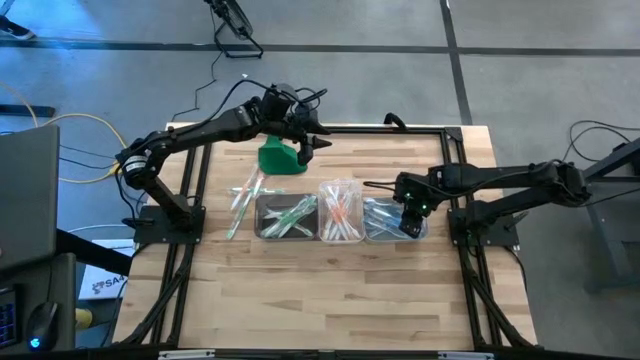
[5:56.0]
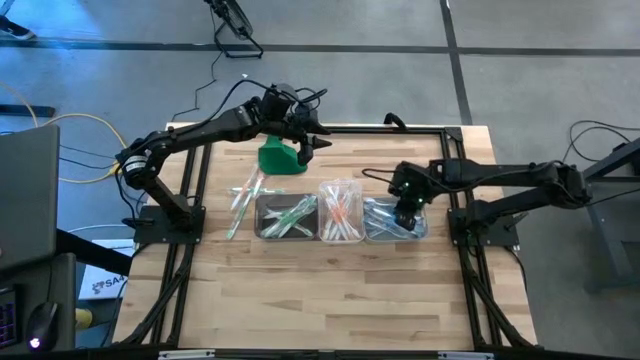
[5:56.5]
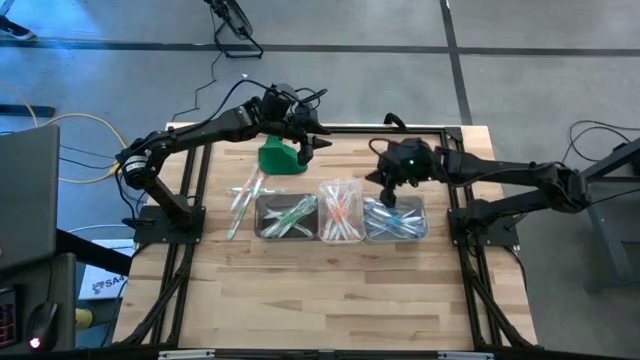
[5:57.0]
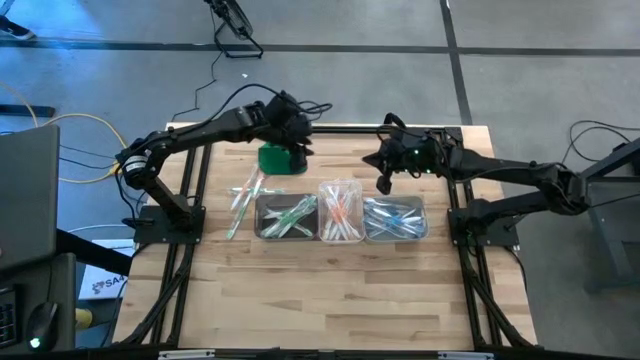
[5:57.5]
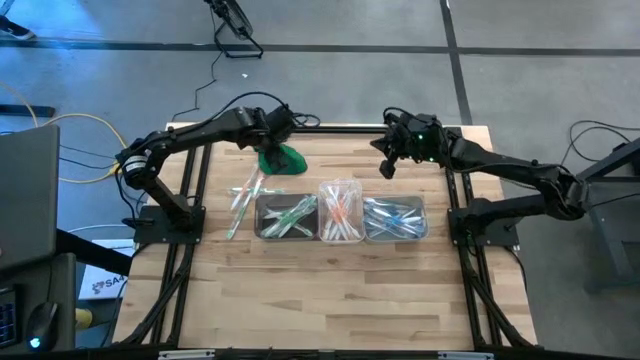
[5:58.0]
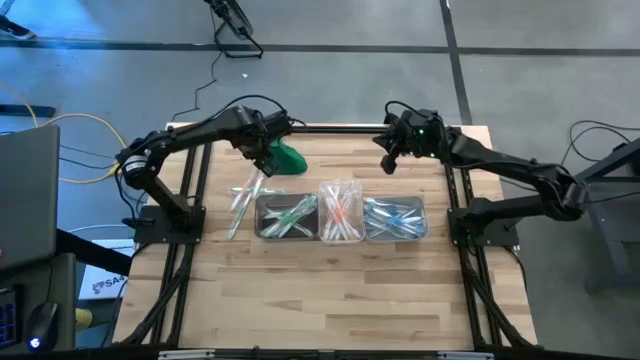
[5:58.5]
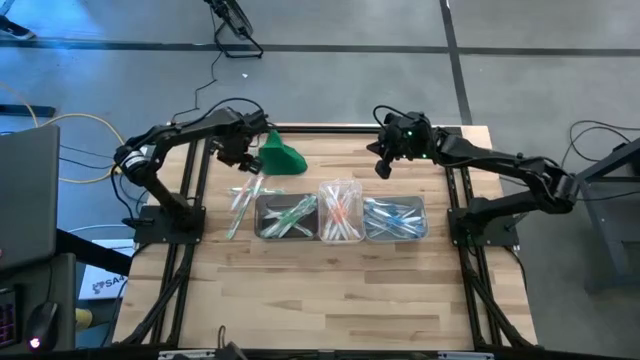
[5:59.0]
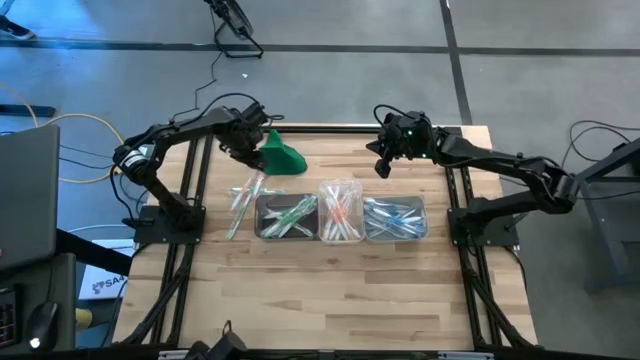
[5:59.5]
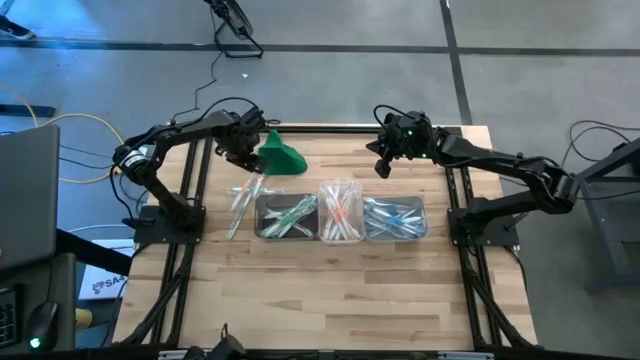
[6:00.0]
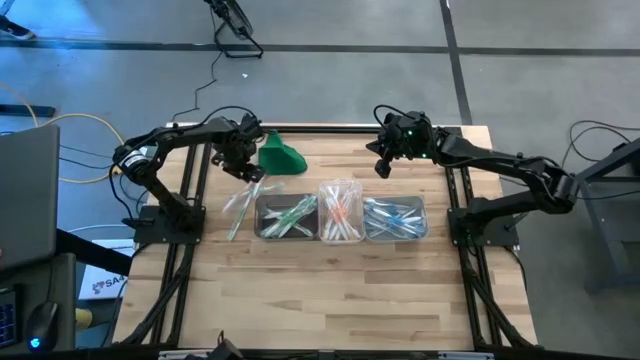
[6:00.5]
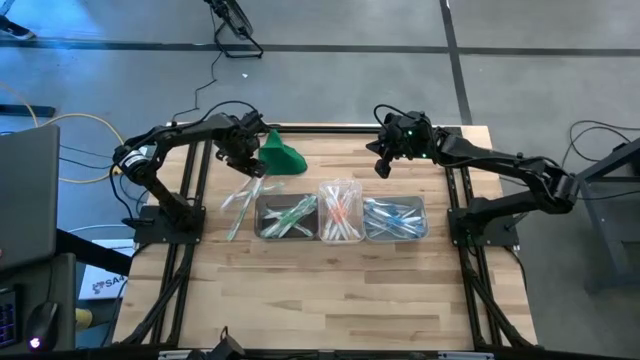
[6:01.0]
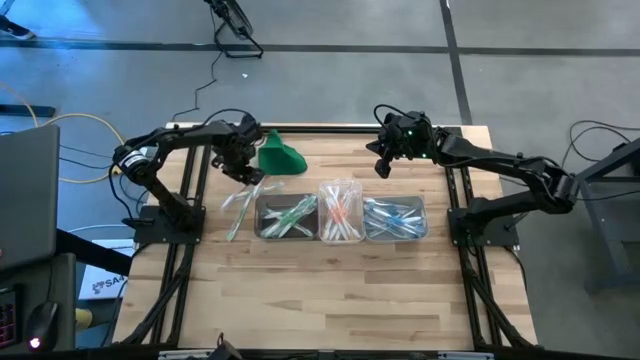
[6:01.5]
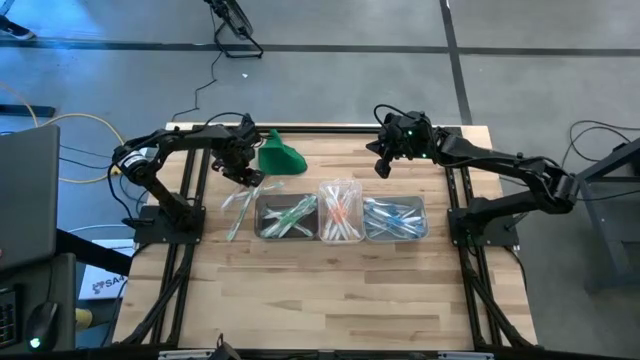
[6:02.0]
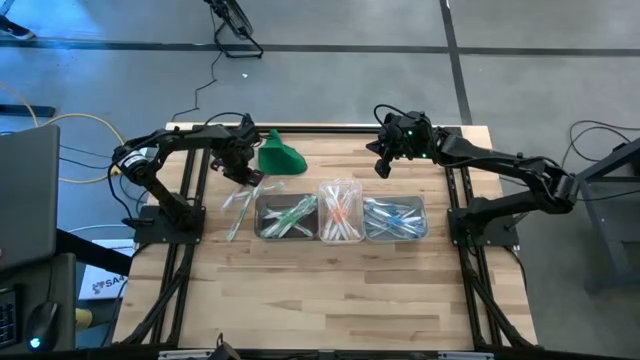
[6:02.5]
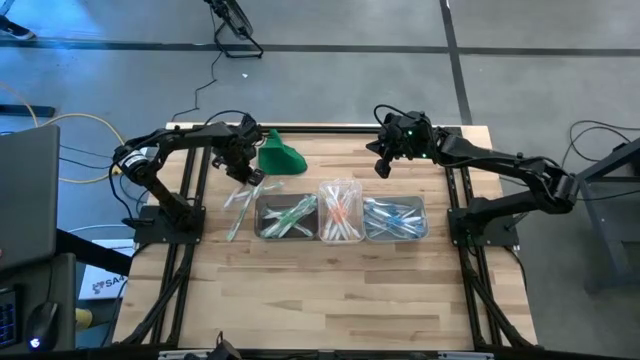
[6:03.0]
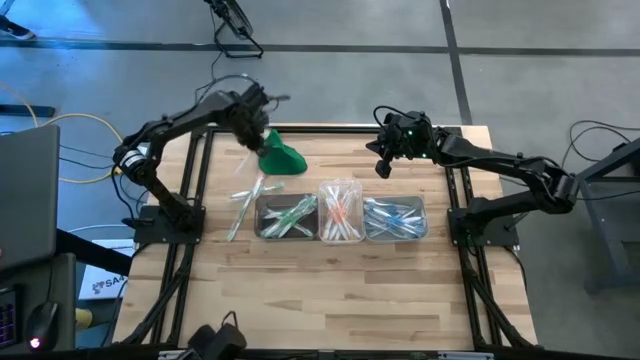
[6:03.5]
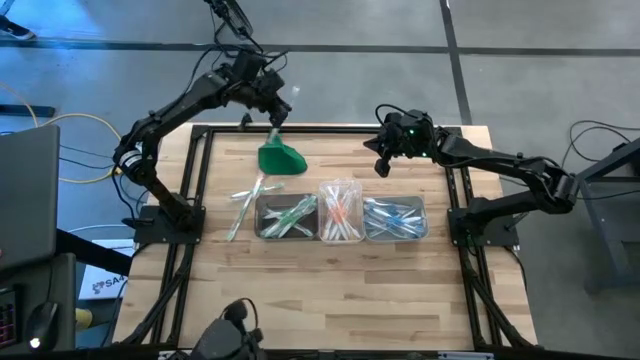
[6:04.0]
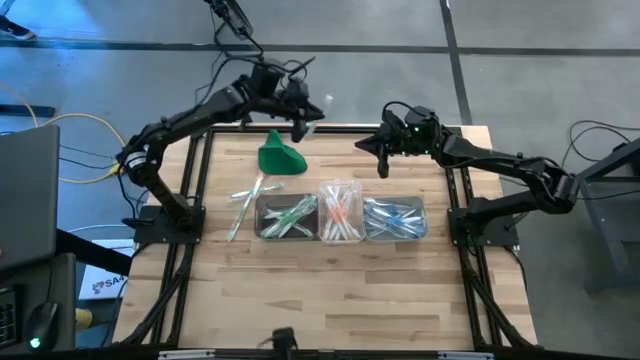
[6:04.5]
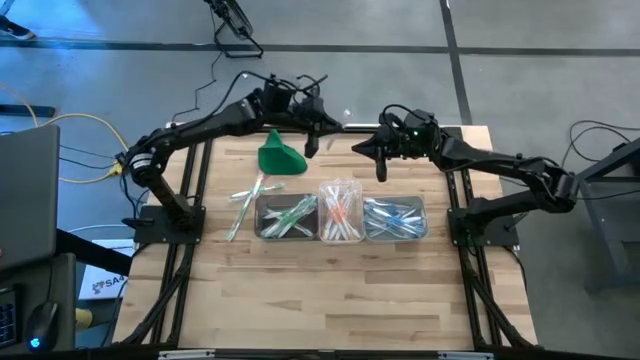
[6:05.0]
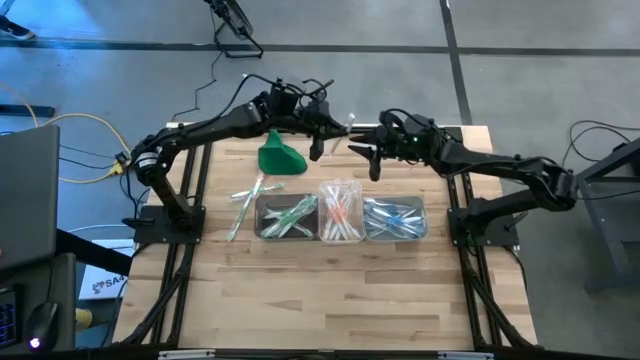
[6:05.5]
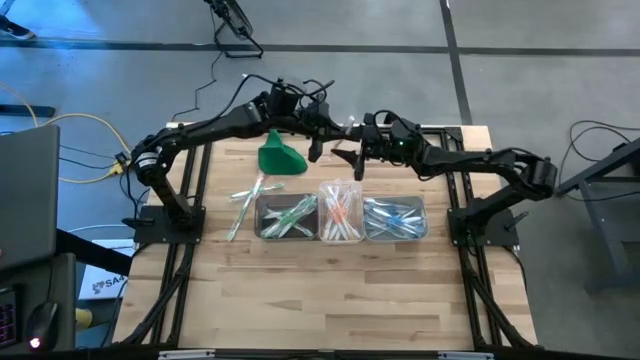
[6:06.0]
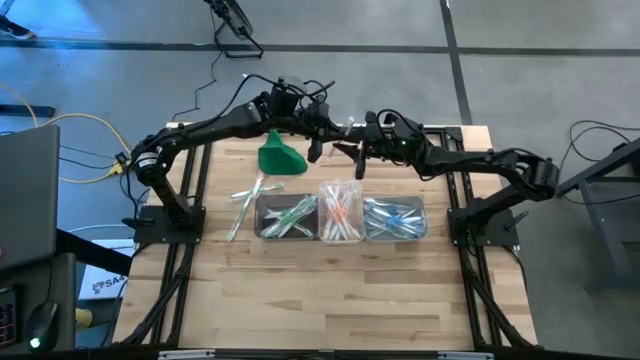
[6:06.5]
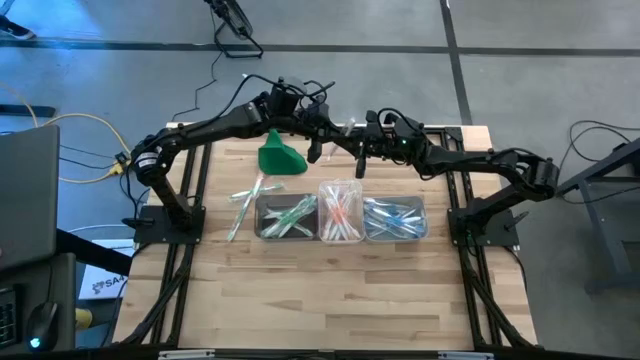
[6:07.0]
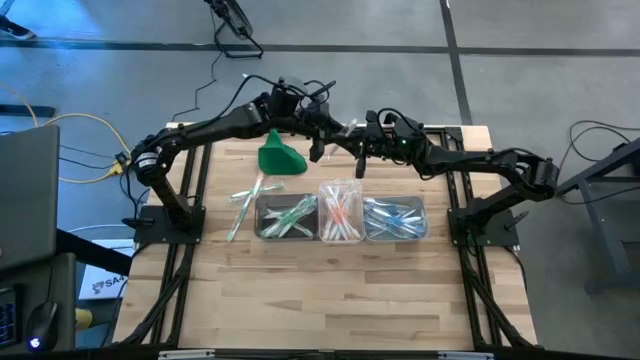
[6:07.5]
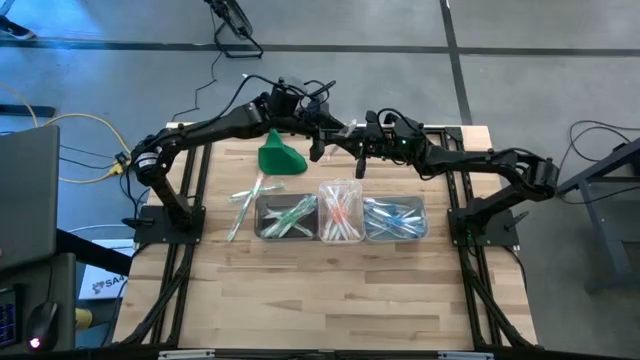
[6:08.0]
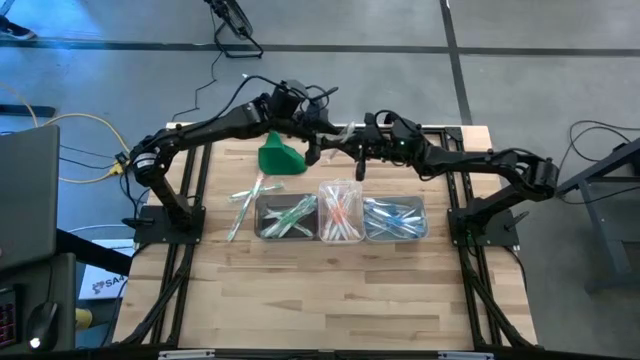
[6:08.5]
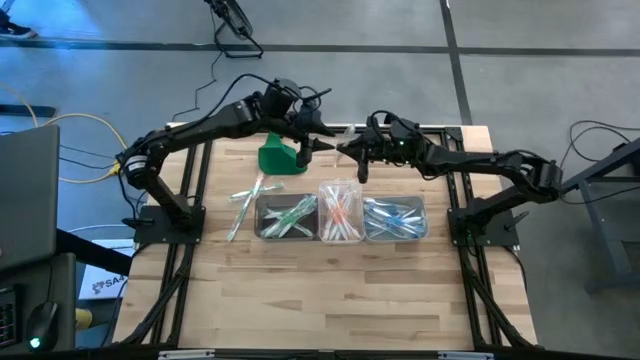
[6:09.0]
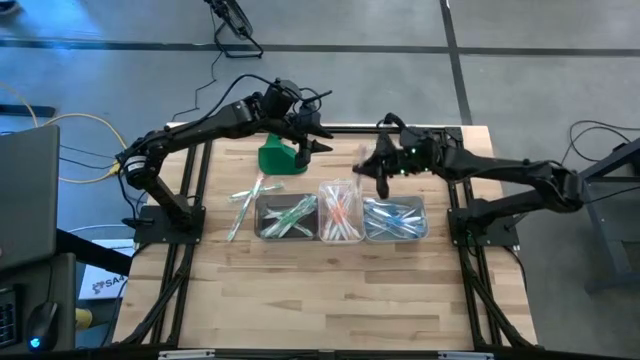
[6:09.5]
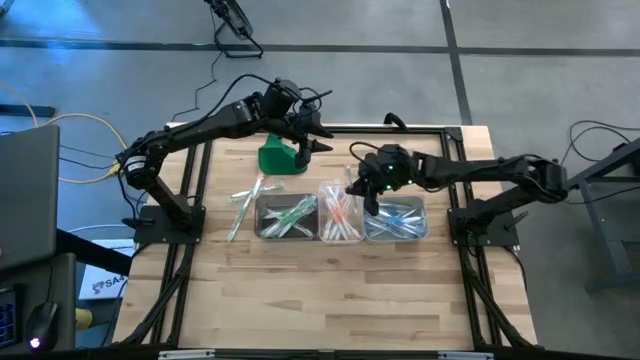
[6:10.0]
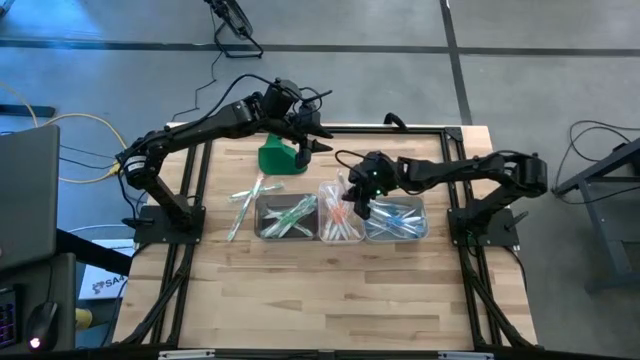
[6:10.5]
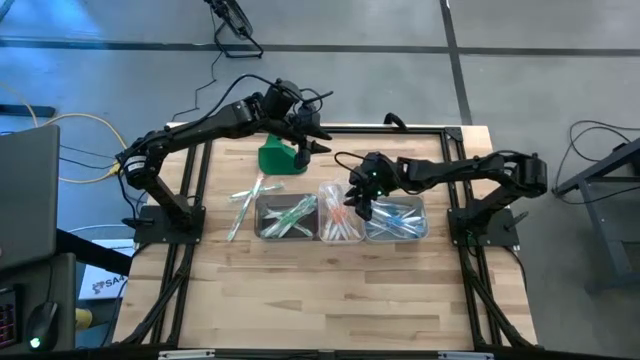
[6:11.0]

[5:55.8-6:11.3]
Task: Pick & Place Toothbrushes
Put the orange toothbrush into the transparent bin

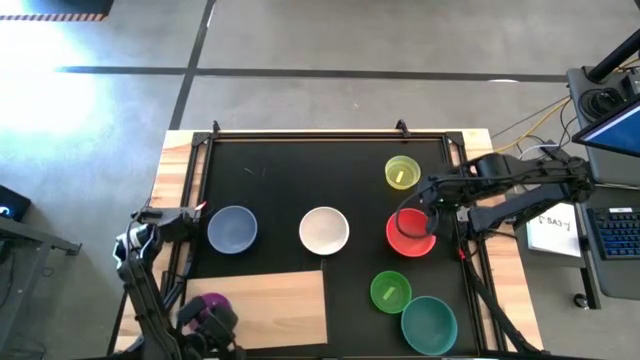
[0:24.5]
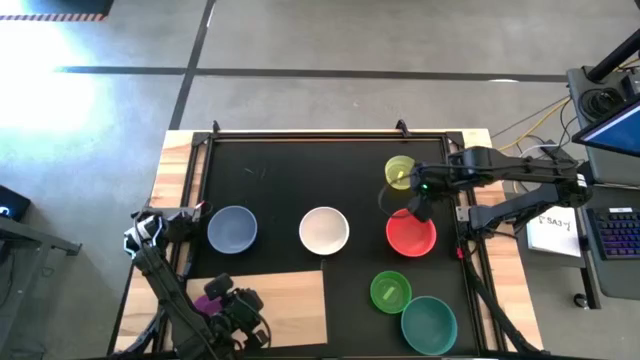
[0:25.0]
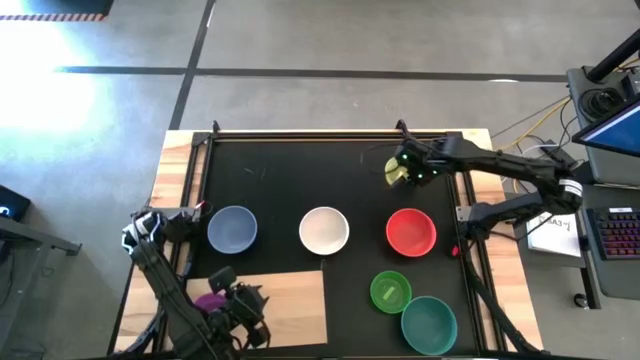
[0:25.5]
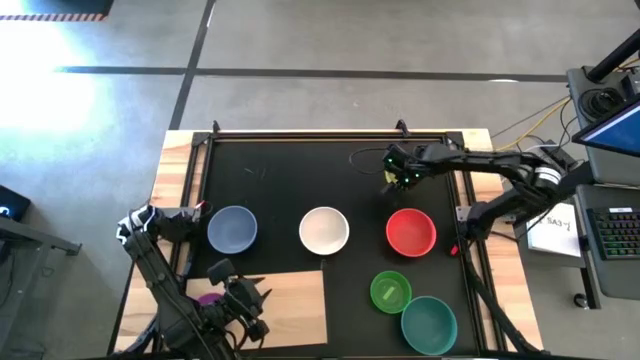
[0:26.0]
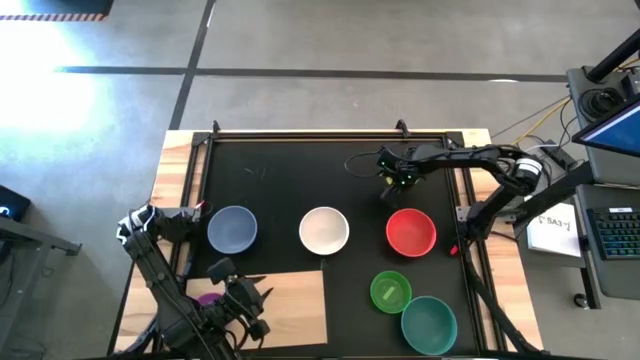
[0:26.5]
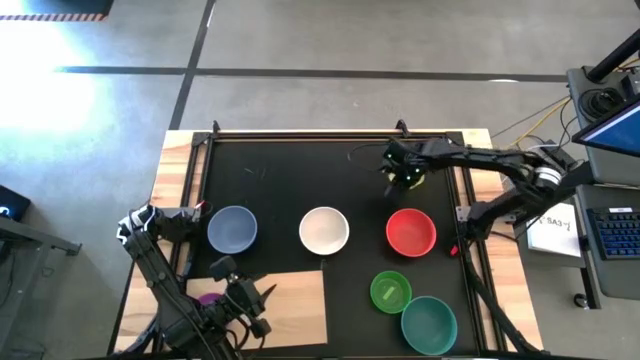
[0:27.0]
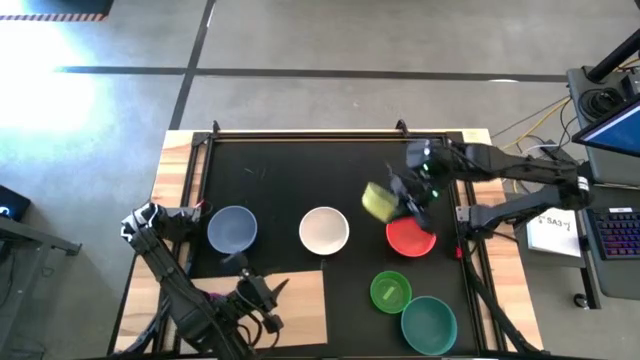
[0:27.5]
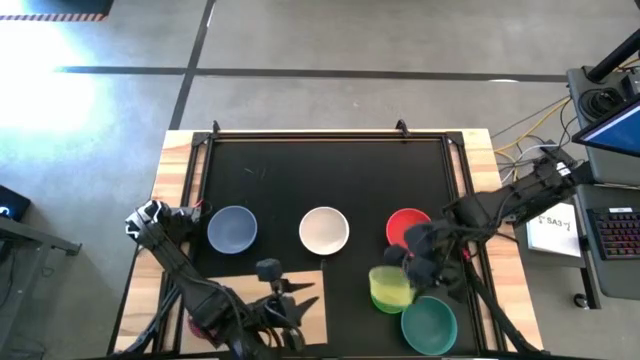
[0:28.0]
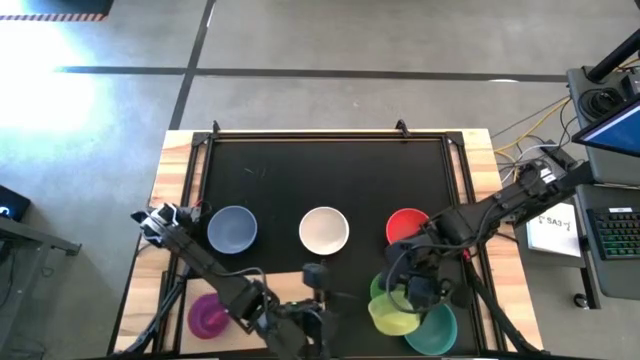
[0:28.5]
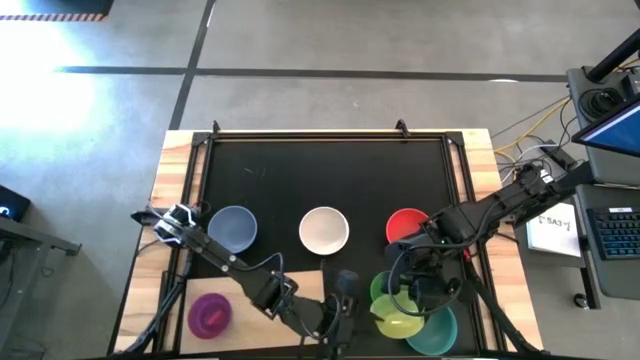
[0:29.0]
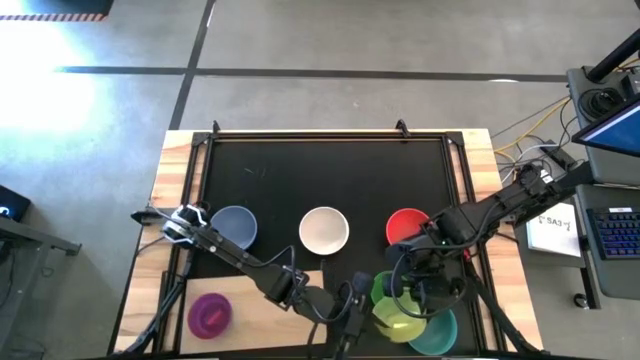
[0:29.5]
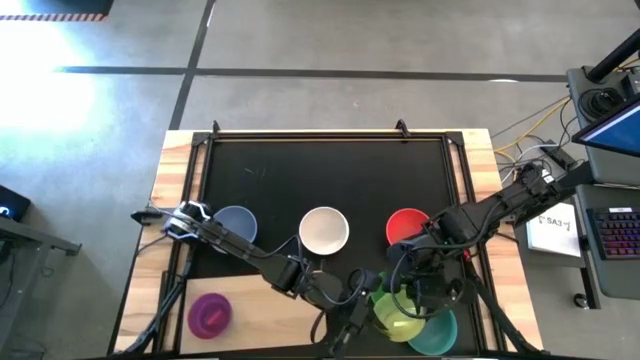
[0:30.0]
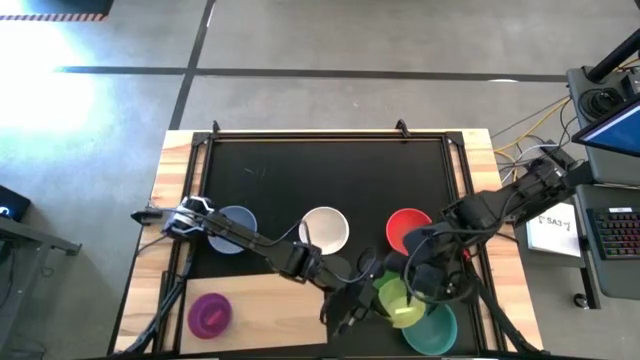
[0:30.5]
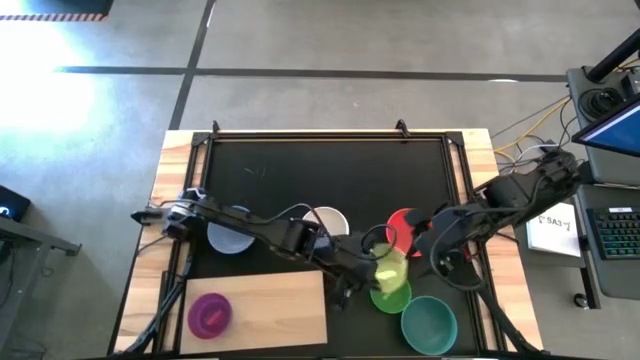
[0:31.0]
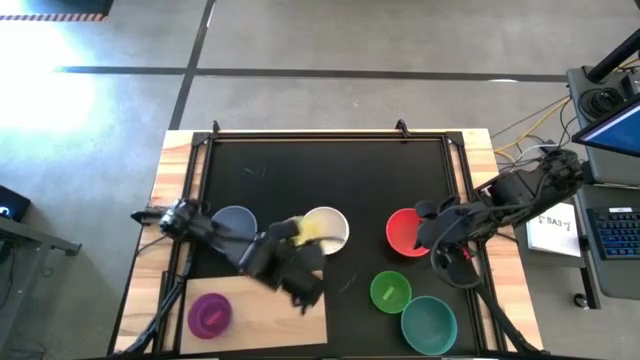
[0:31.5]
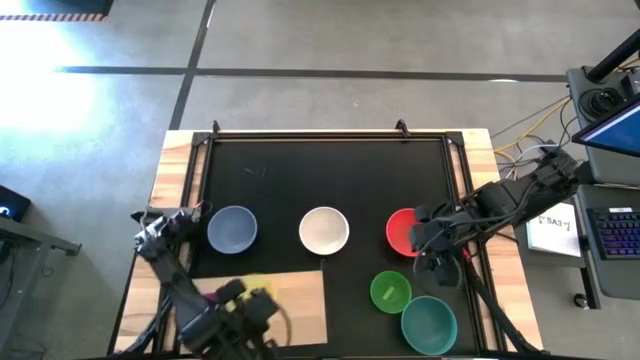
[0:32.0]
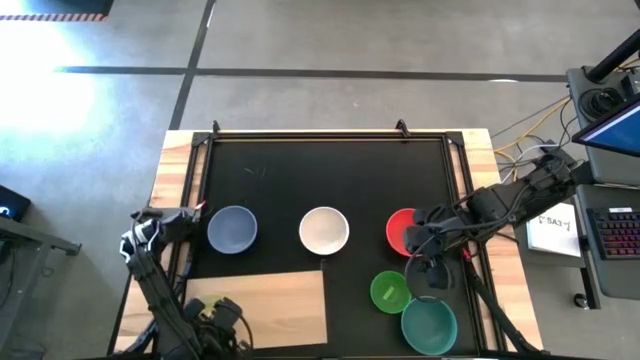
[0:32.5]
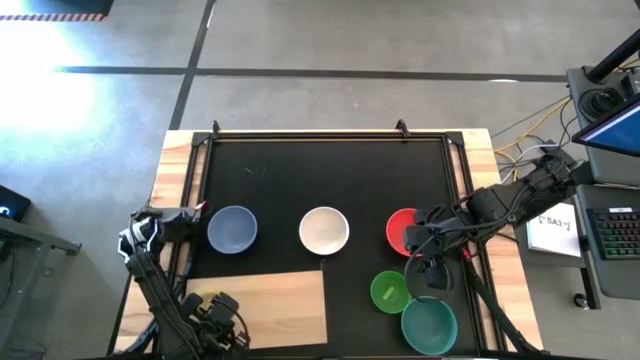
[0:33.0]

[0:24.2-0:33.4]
Task: Place and stack bowls onto a shelf
Stack the yellow bowl on top of the pink bowl on the shelf
